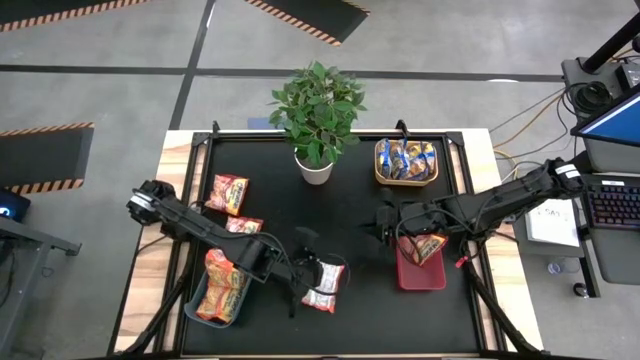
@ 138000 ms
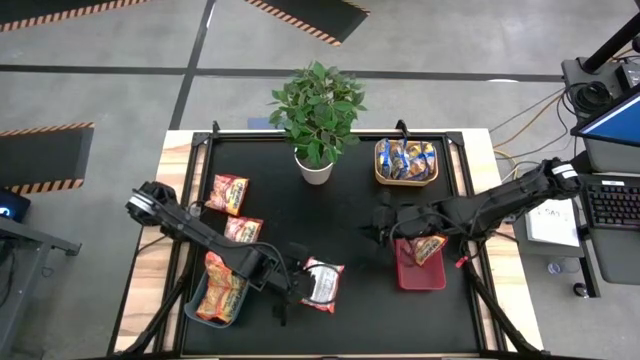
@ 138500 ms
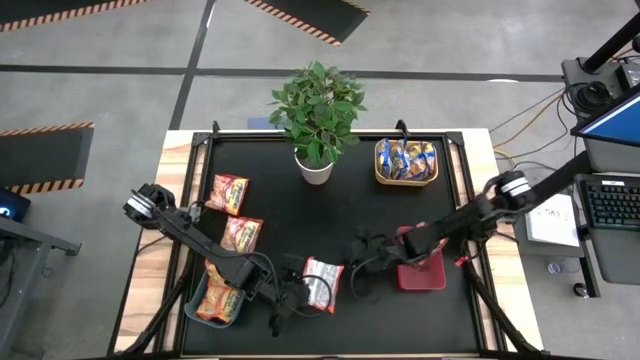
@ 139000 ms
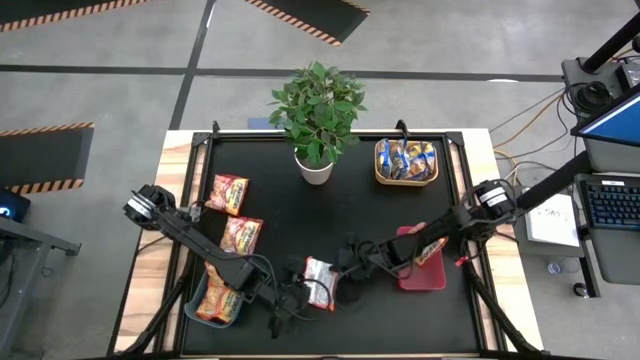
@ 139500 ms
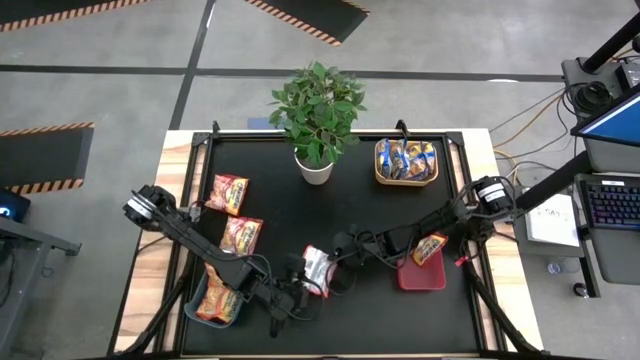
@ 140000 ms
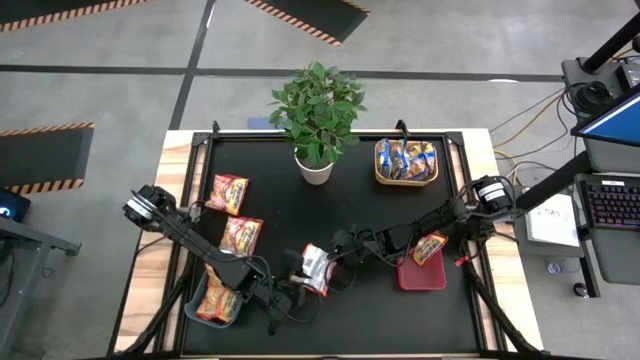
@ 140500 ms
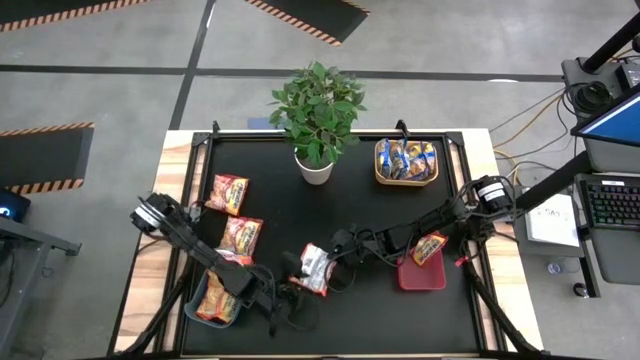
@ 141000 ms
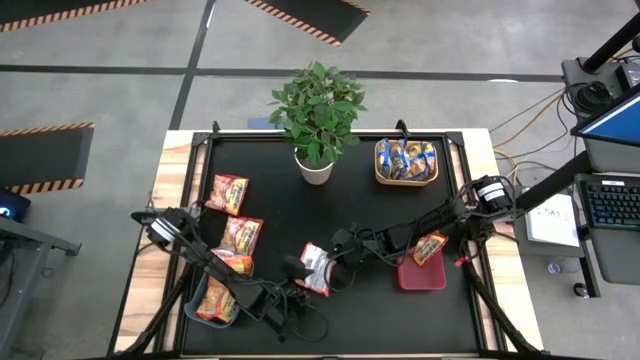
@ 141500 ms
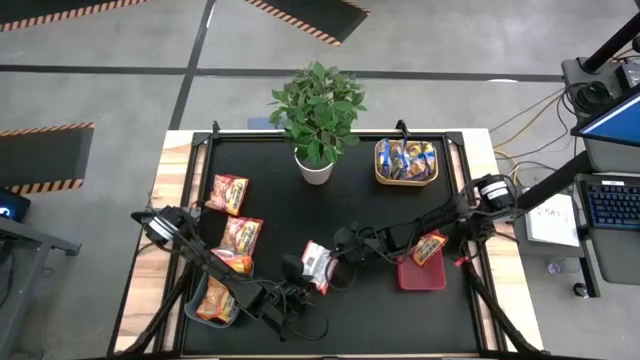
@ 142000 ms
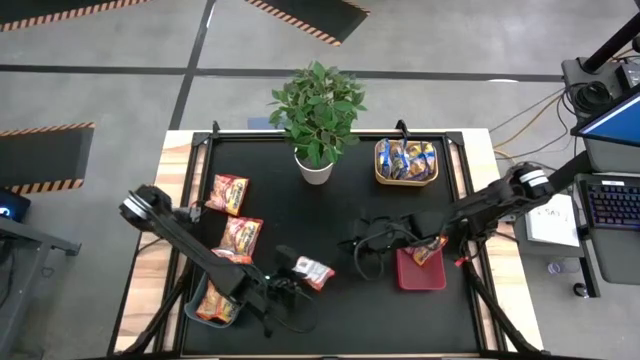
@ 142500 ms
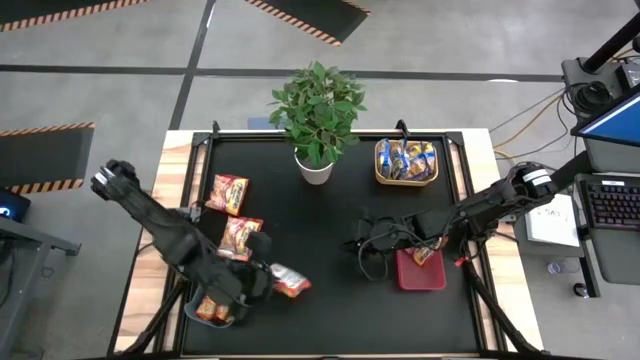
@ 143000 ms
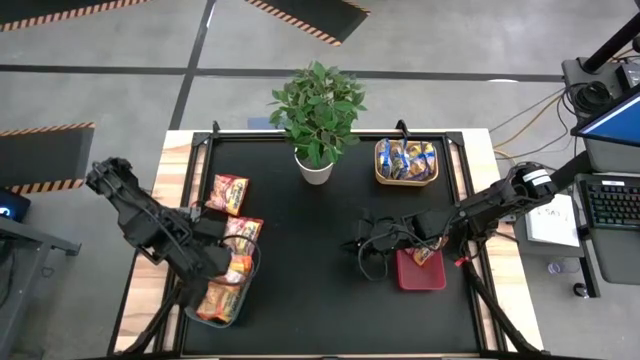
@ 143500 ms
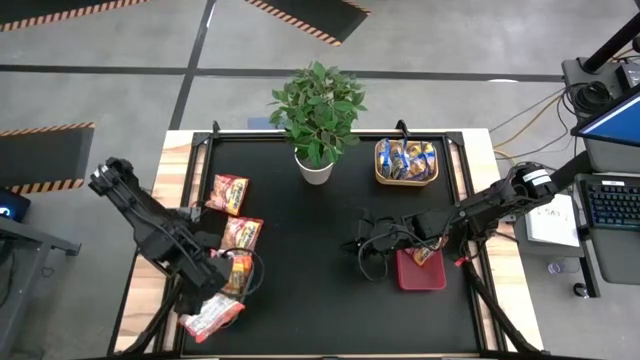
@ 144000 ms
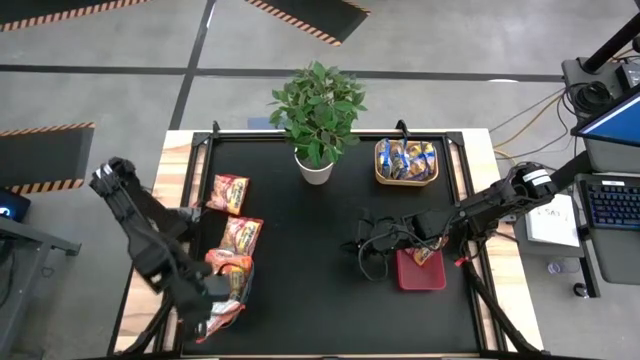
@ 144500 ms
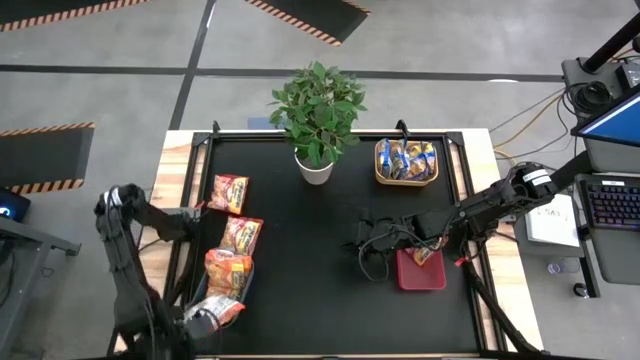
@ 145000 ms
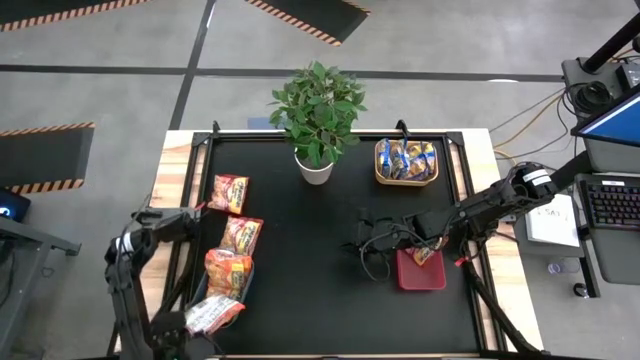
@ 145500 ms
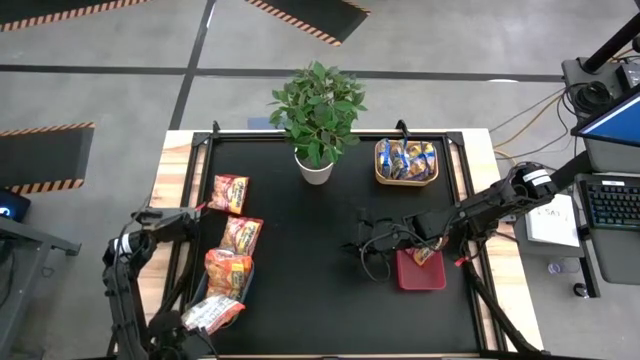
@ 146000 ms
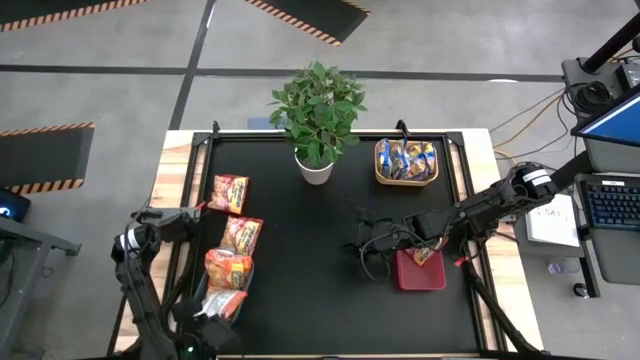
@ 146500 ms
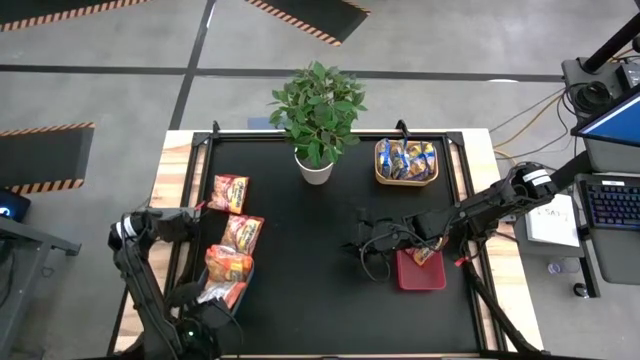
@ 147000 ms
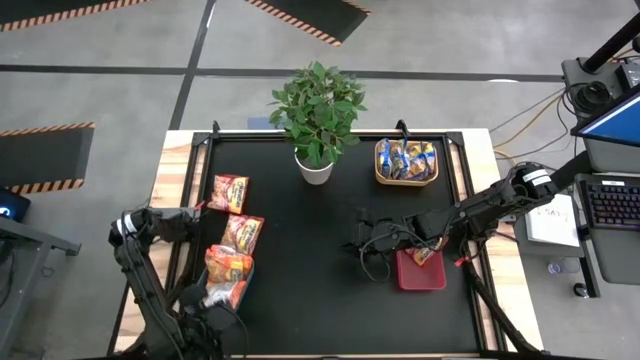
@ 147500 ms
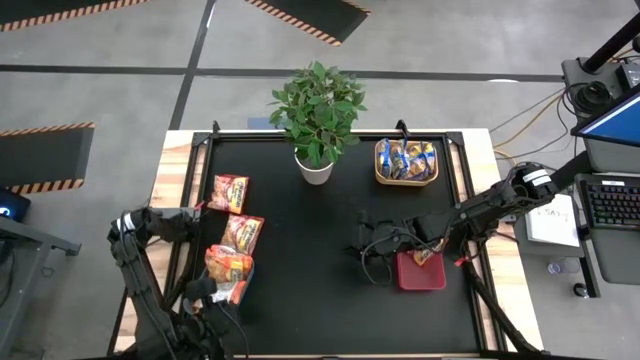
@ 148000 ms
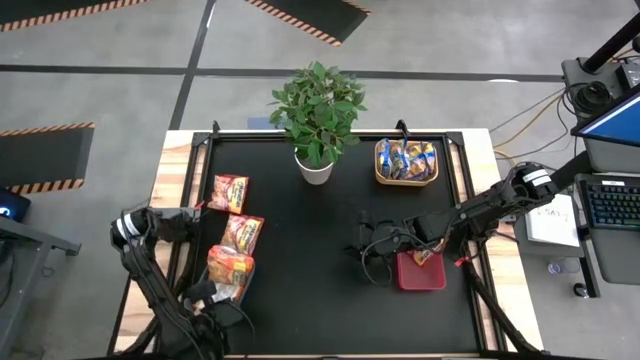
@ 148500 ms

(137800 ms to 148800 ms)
Task: Sort Maruchan noodles
Put the orange noodle pack into the blue bin

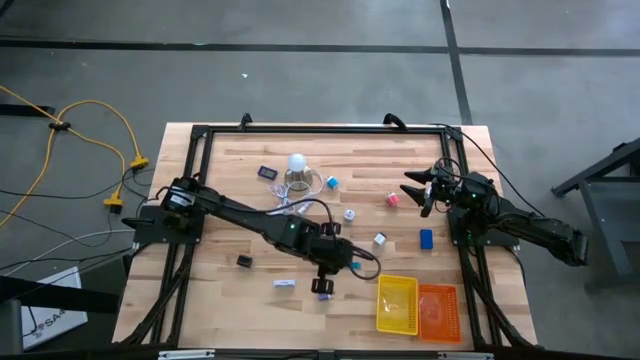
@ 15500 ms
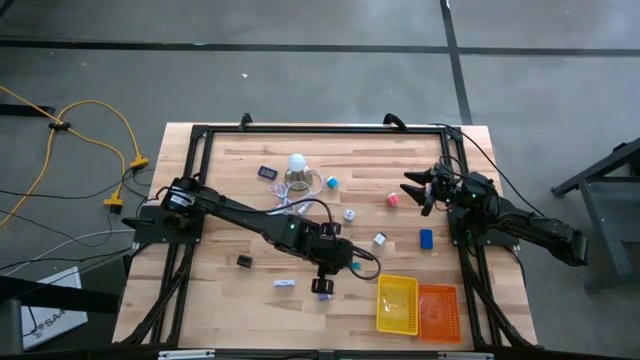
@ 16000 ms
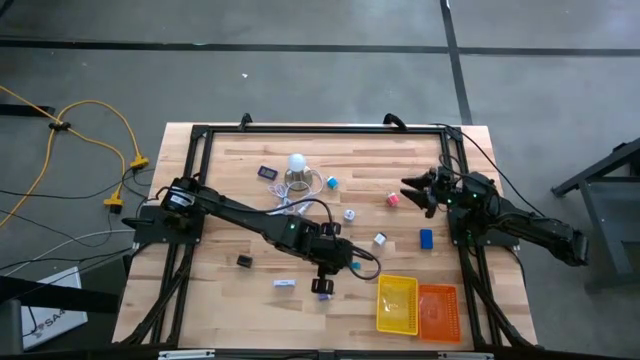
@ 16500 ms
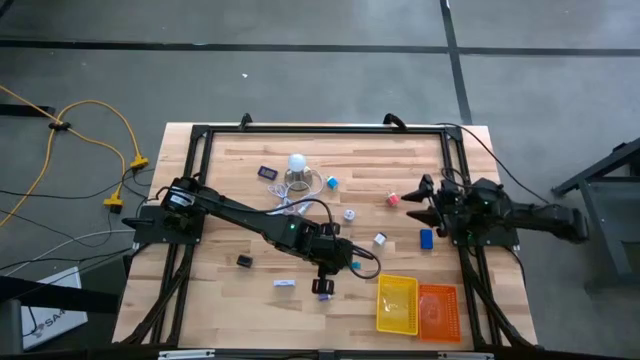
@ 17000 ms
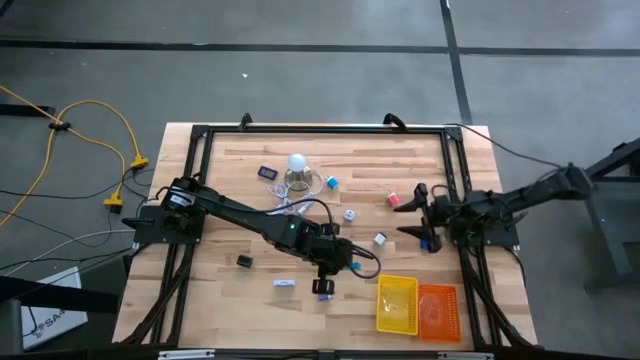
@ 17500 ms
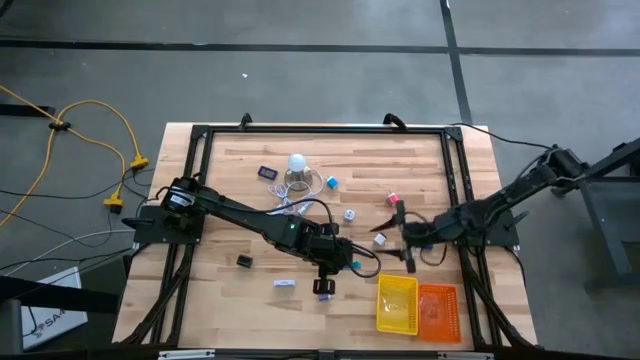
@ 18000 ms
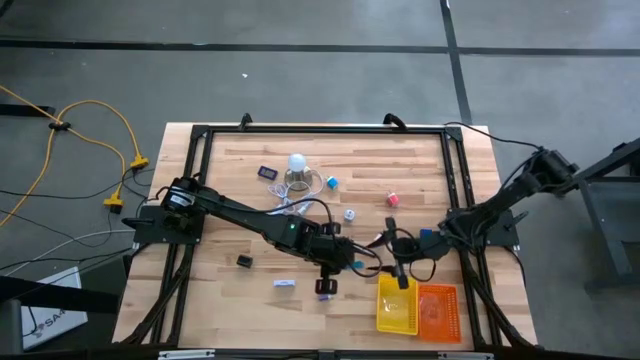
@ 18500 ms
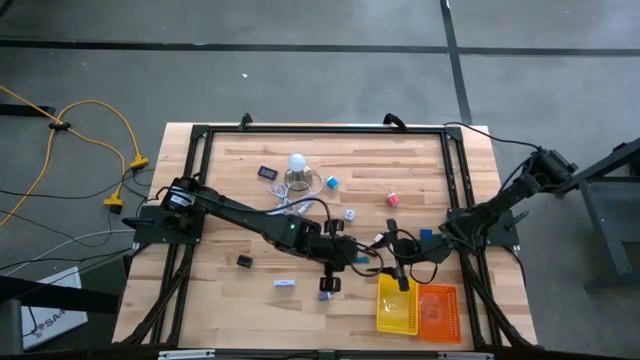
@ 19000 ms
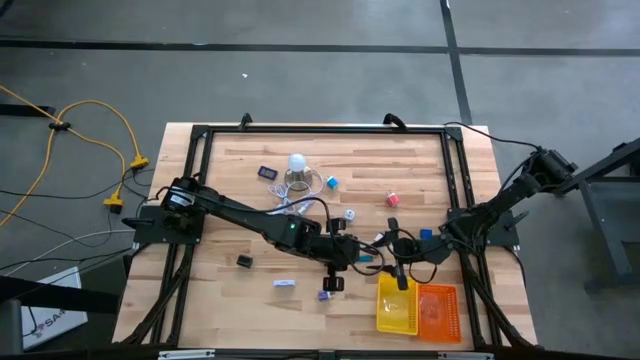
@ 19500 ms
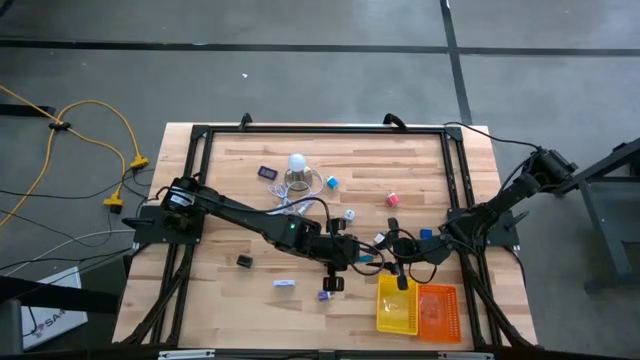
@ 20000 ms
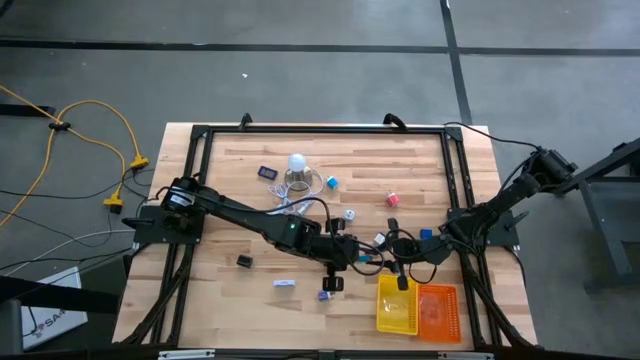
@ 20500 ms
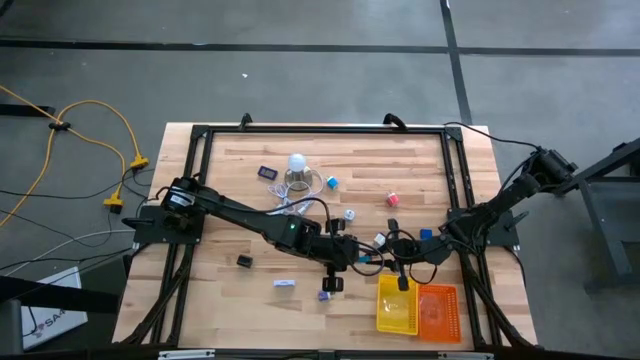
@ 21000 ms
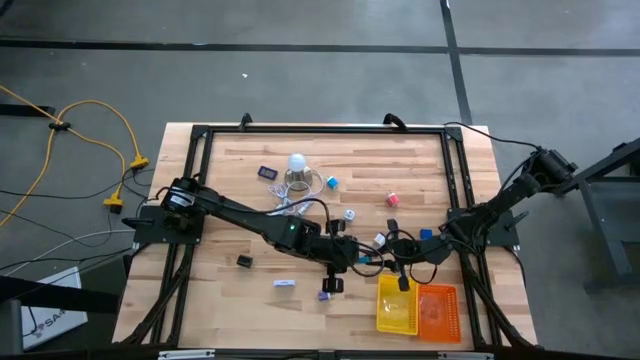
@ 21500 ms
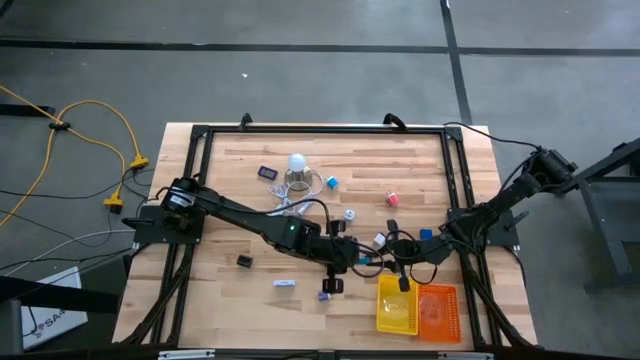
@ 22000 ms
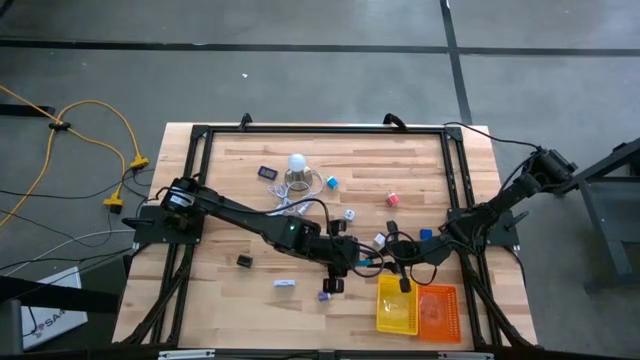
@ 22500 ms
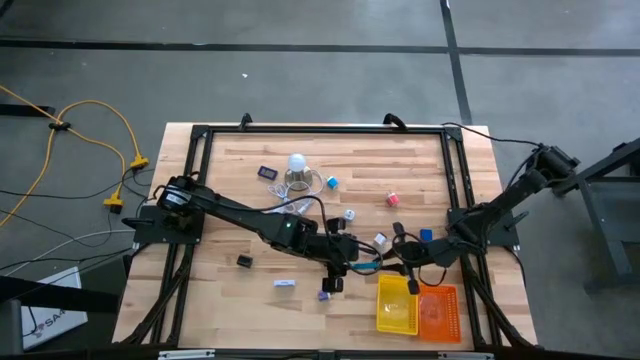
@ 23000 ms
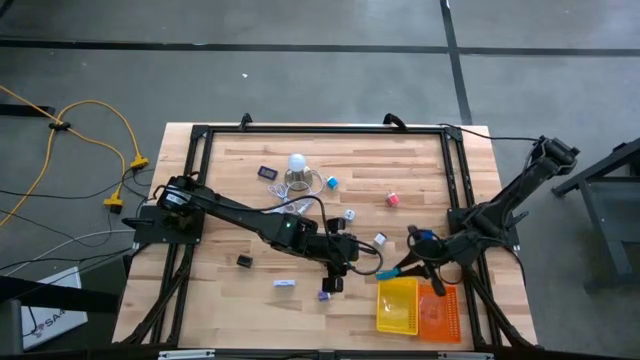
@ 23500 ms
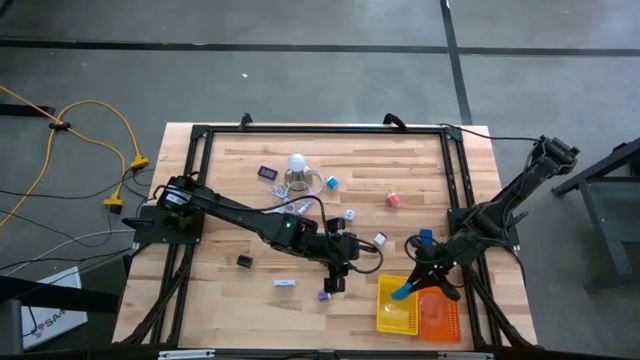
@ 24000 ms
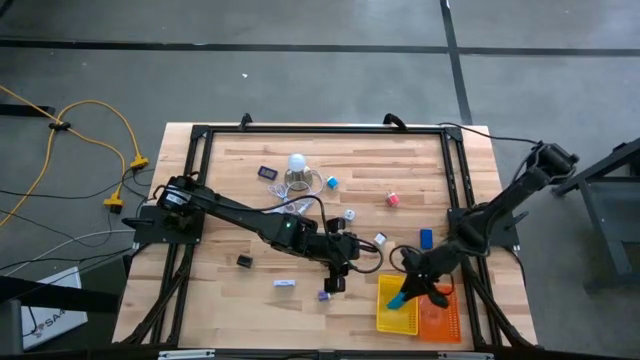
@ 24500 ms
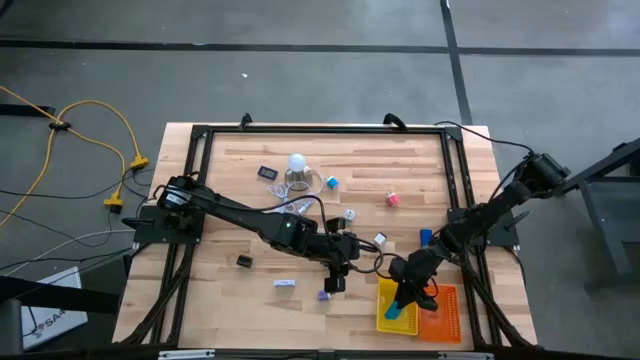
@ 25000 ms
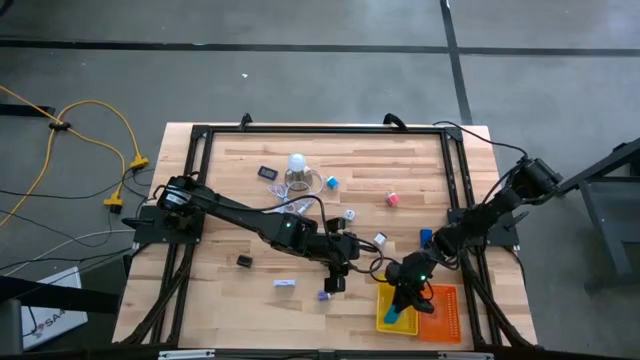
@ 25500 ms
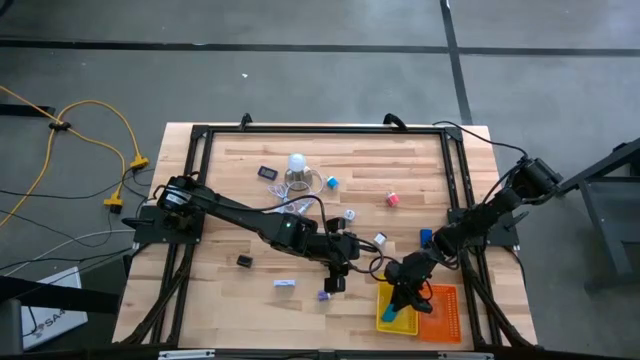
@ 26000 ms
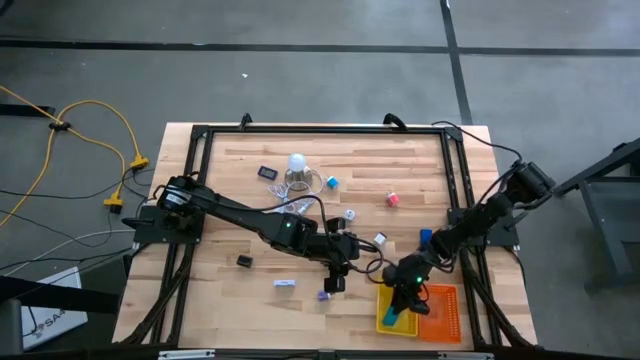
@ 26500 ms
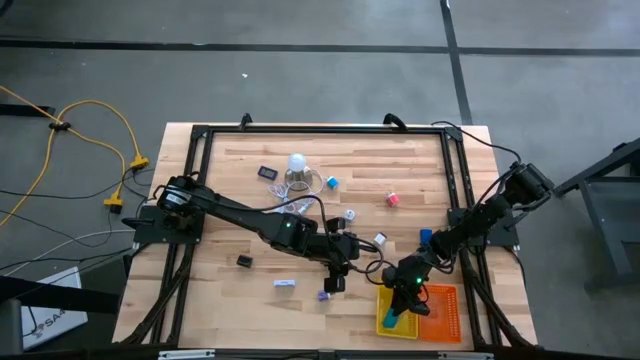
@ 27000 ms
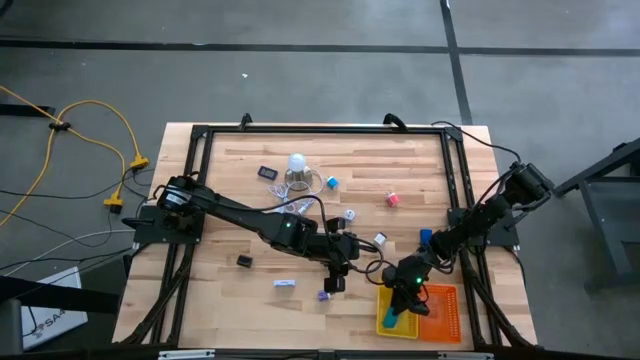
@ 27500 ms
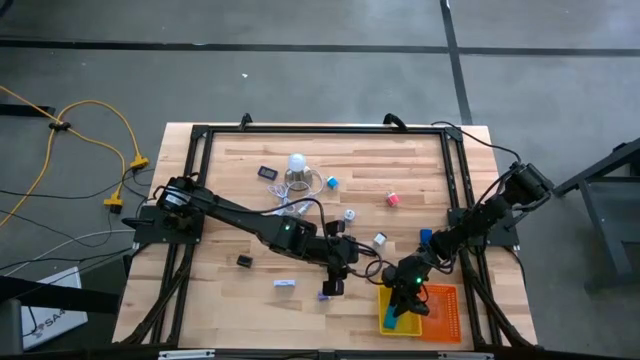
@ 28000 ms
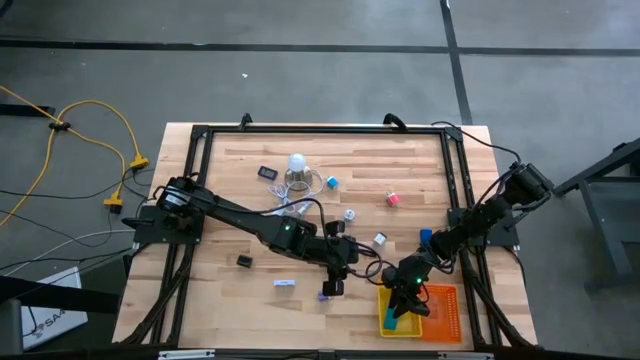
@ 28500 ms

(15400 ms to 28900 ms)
Task: Pick & Place Office items
Put the light blue digital clock into the yellow basket
